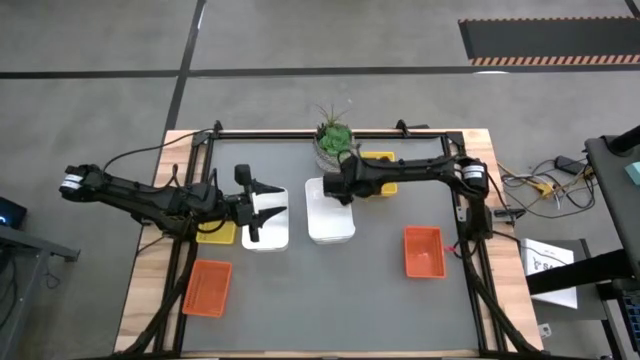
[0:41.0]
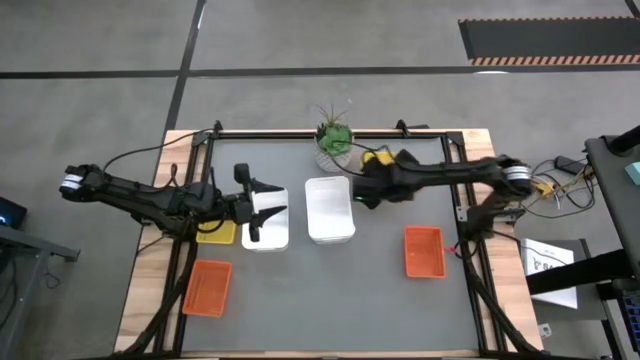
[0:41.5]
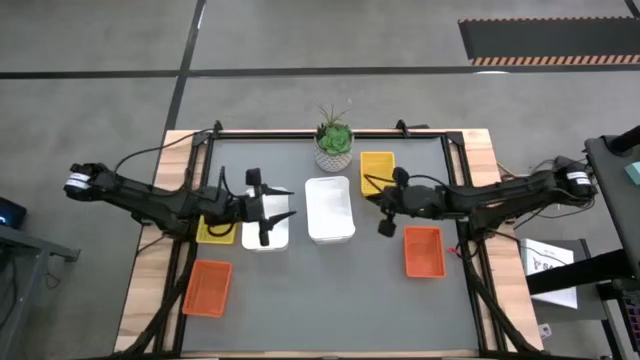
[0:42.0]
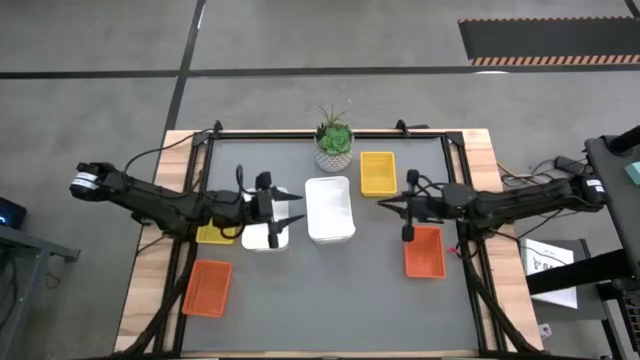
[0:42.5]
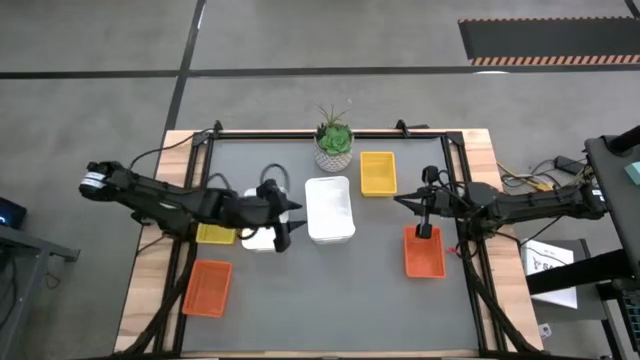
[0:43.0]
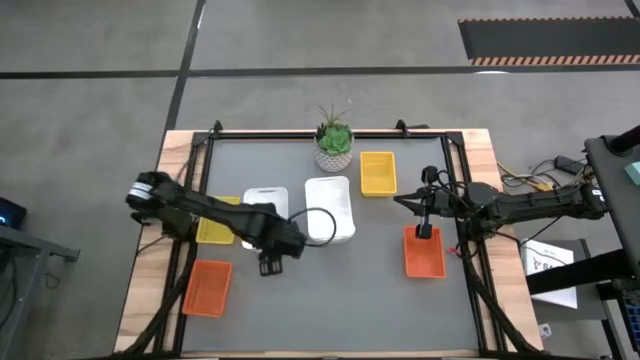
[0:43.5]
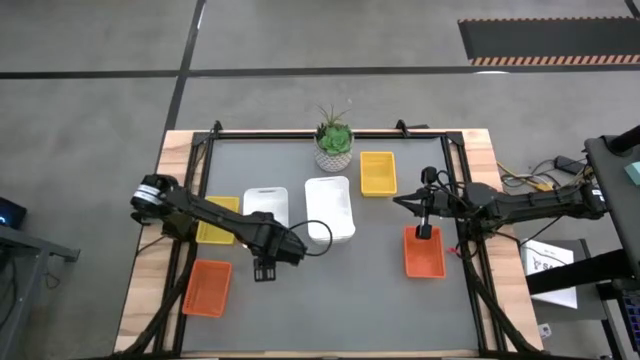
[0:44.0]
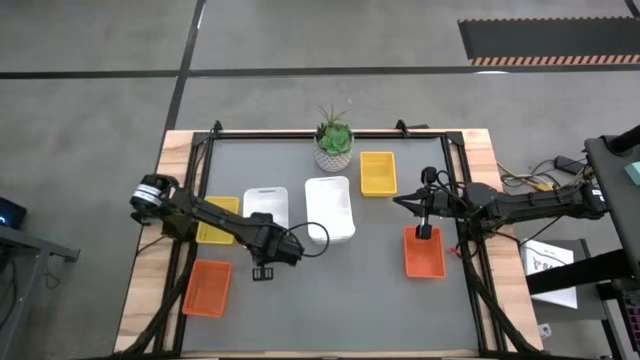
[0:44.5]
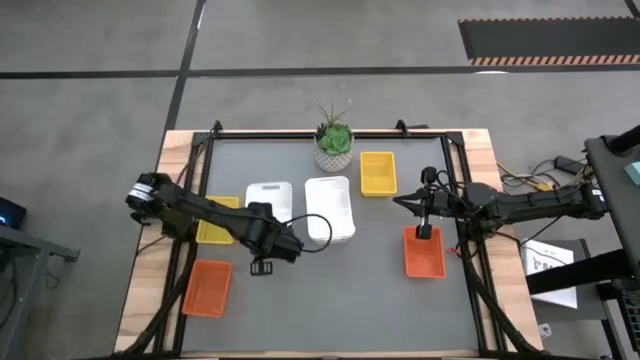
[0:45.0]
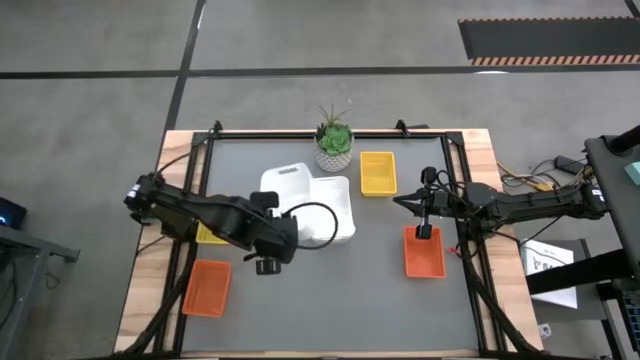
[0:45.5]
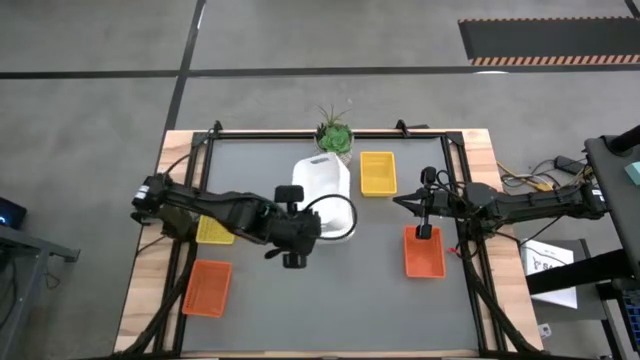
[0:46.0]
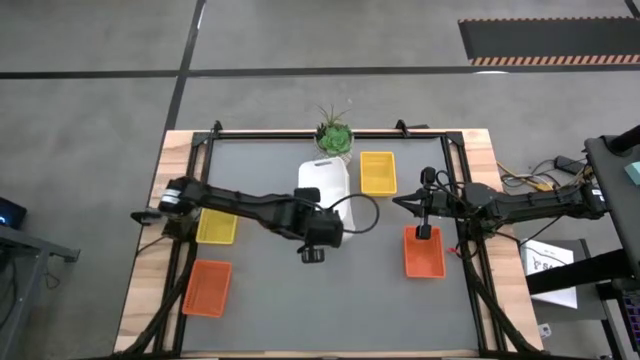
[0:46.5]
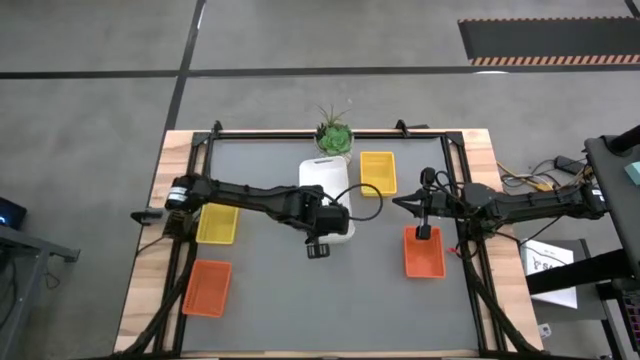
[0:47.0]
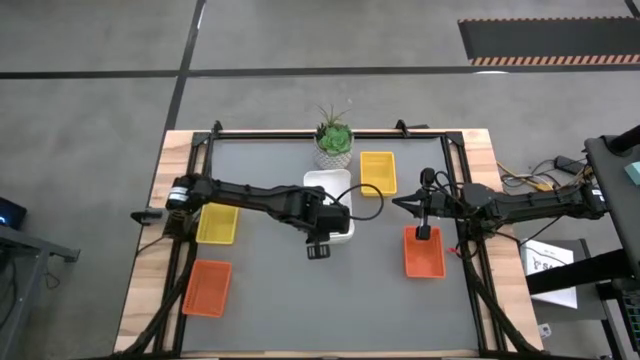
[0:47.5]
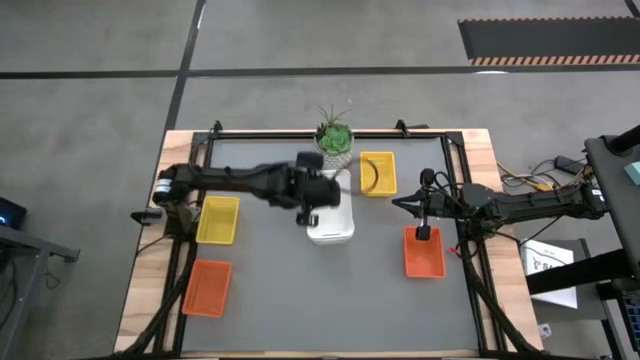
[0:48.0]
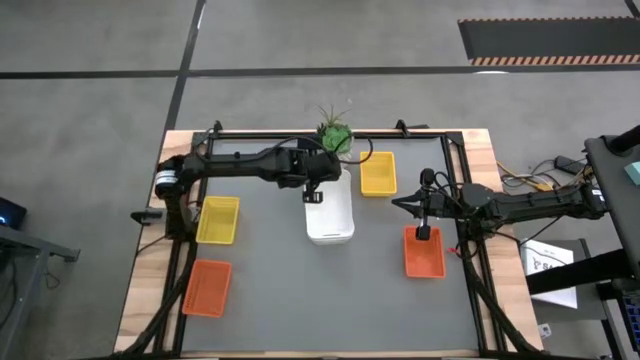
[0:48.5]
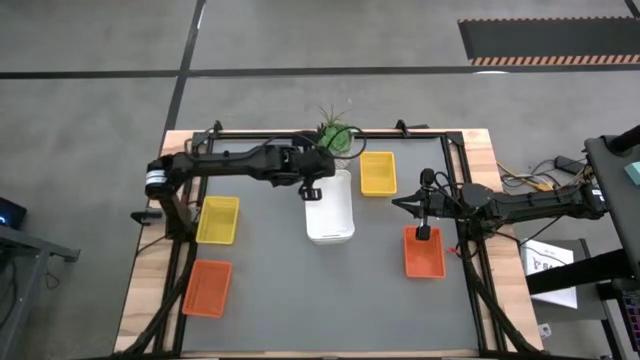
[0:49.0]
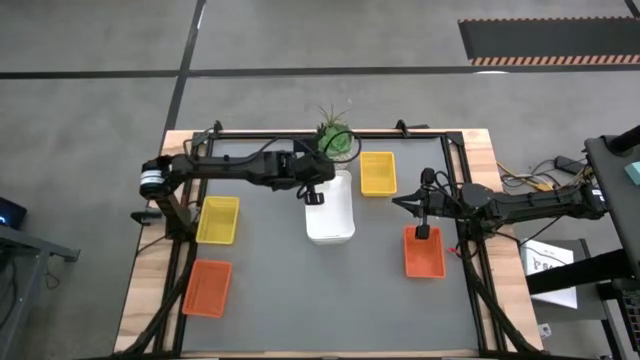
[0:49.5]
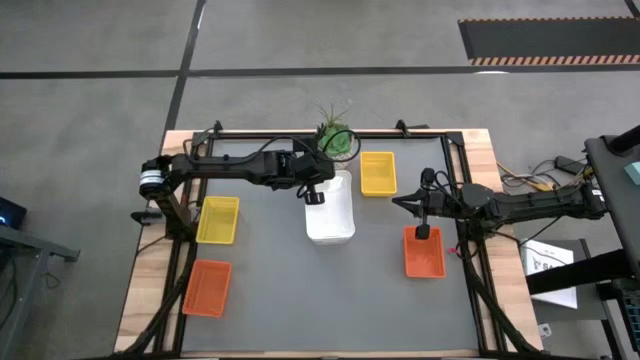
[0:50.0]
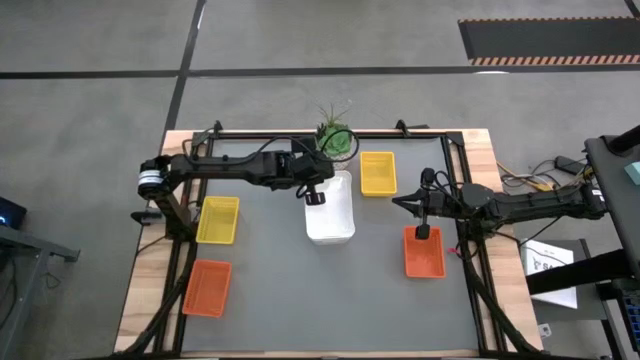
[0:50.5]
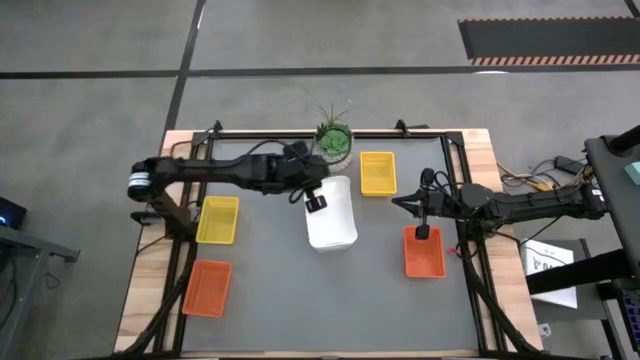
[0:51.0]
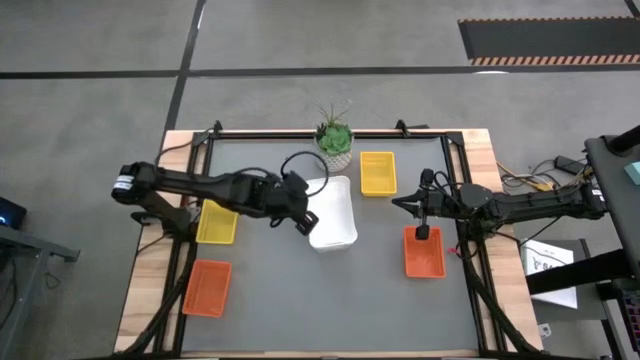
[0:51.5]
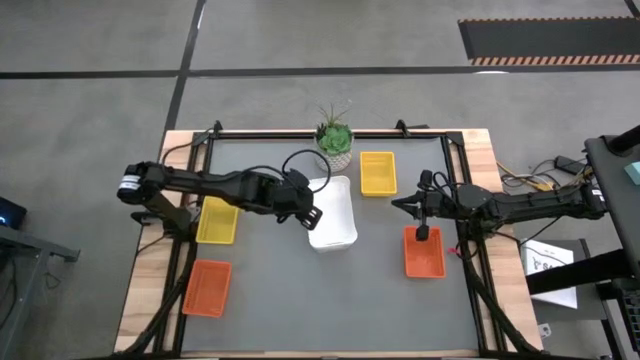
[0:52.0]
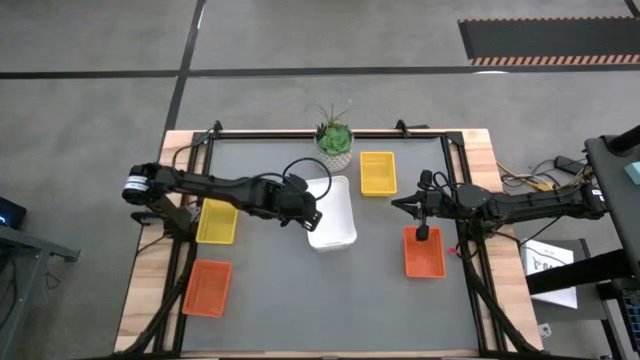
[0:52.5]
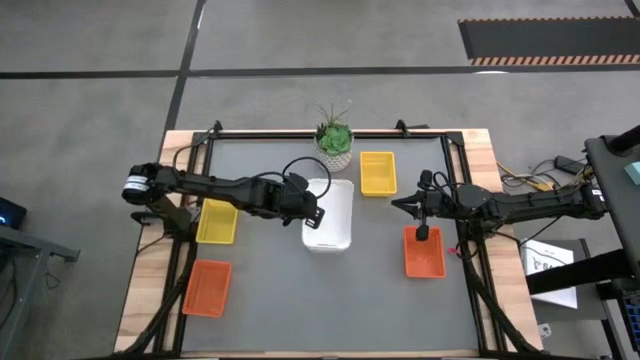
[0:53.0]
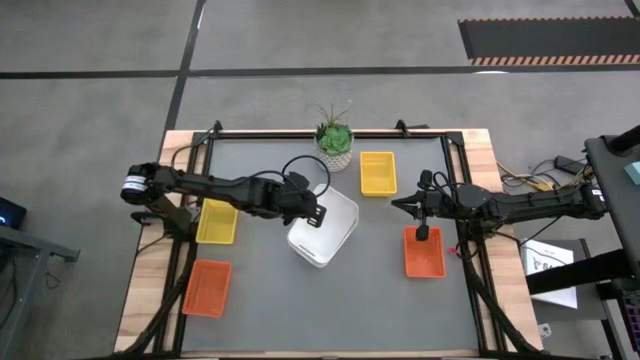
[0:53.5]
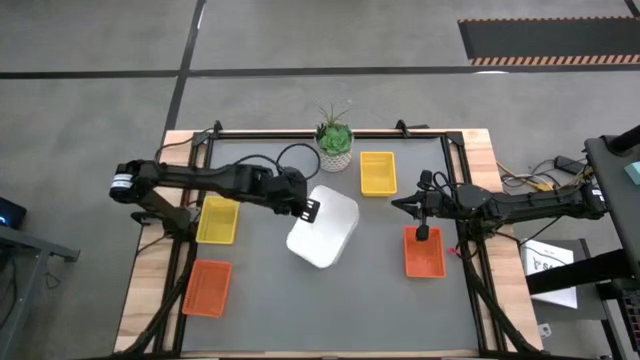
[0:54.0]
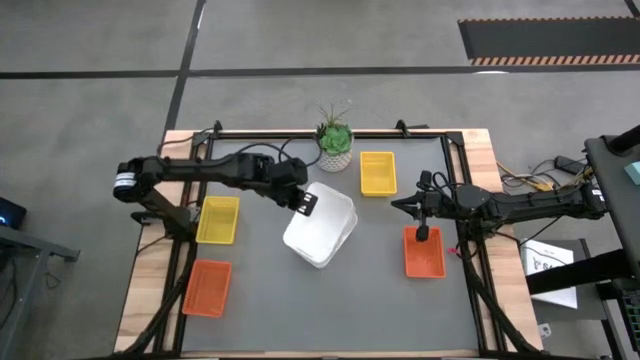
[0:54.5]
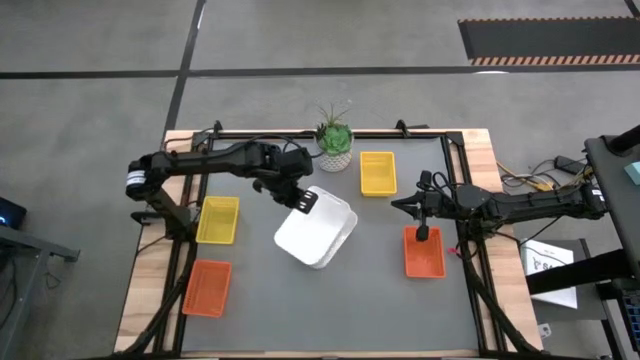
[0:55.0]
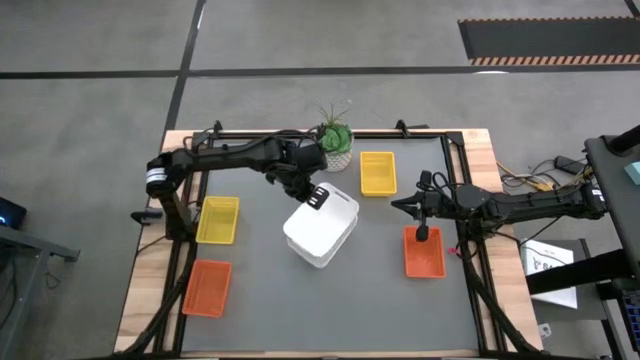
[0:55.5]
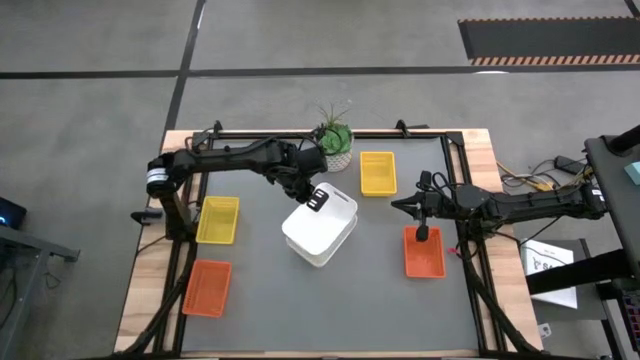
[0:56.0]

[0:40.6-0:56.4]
Stack the left white bin on the right white bins
